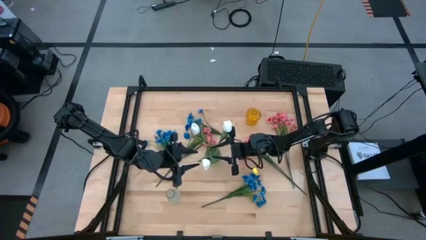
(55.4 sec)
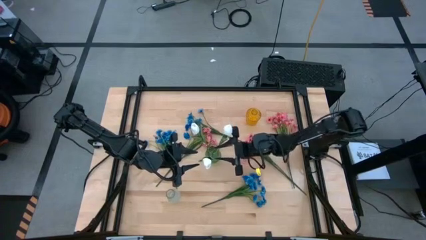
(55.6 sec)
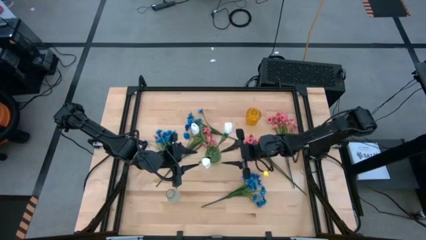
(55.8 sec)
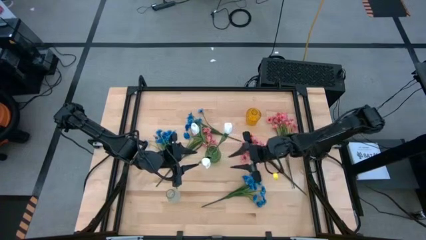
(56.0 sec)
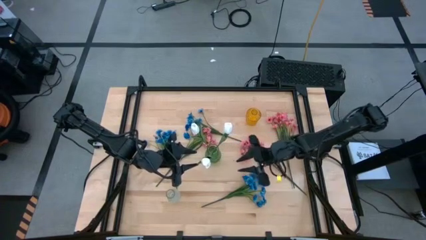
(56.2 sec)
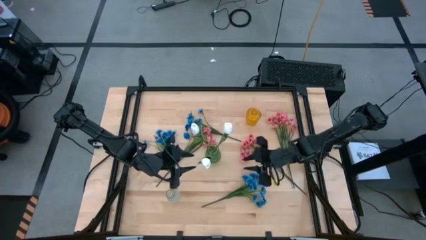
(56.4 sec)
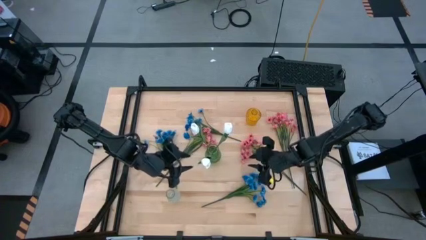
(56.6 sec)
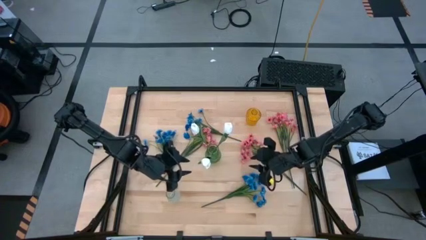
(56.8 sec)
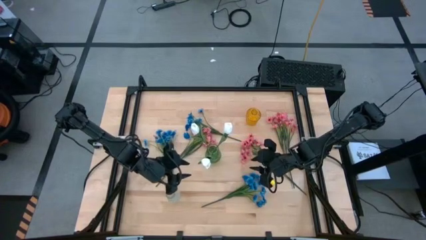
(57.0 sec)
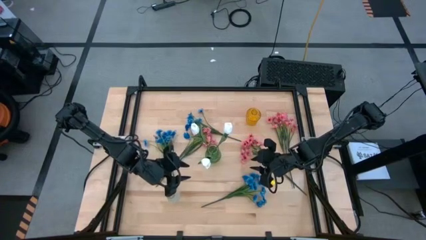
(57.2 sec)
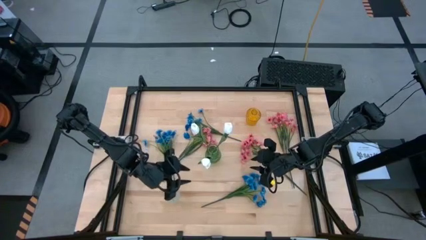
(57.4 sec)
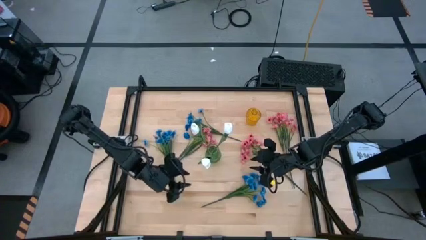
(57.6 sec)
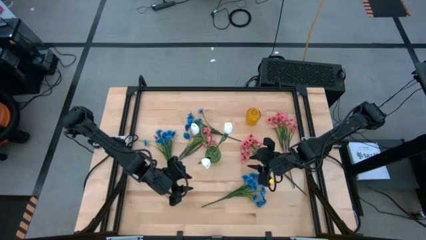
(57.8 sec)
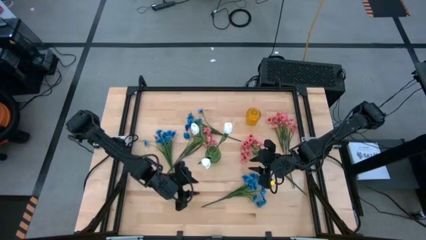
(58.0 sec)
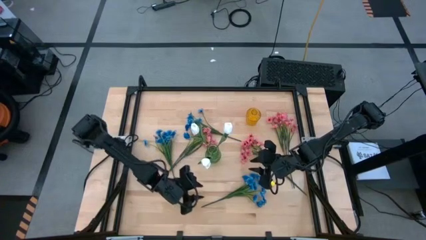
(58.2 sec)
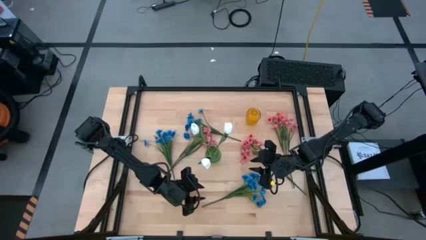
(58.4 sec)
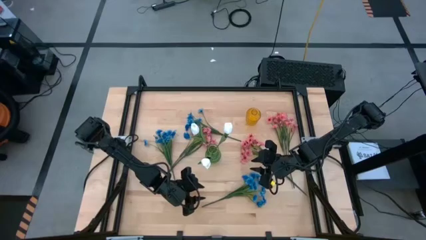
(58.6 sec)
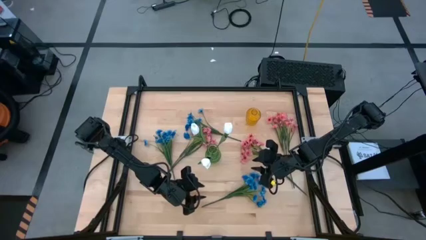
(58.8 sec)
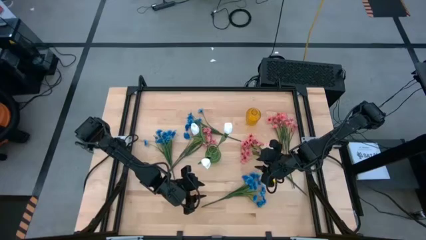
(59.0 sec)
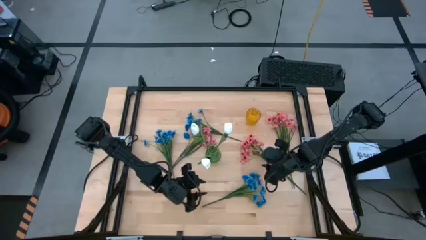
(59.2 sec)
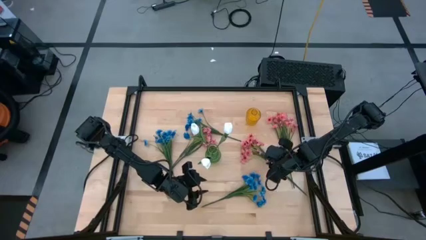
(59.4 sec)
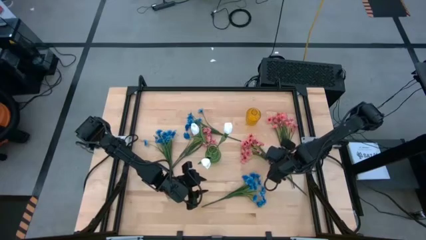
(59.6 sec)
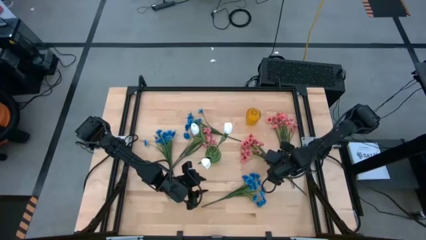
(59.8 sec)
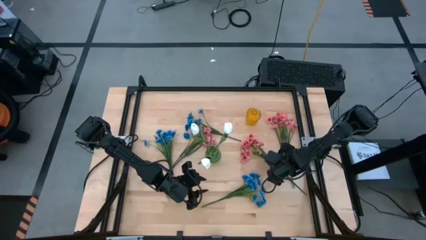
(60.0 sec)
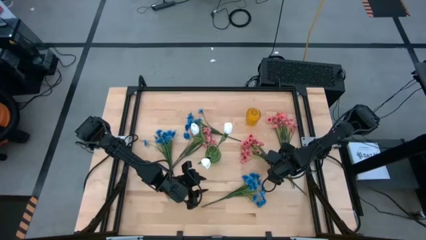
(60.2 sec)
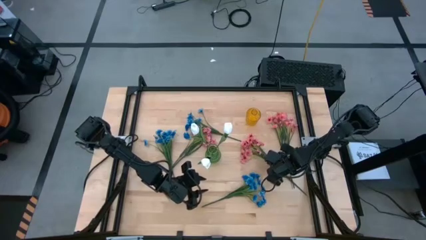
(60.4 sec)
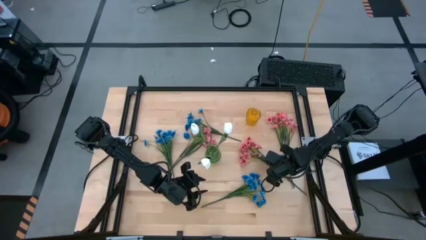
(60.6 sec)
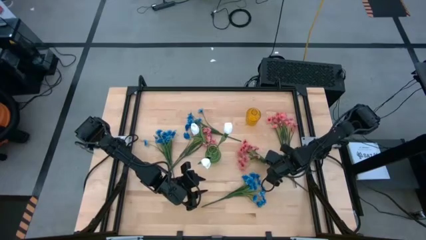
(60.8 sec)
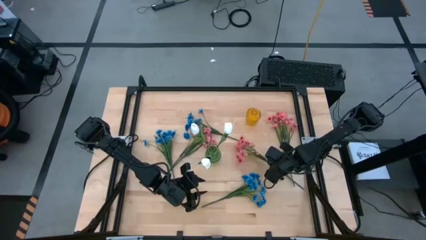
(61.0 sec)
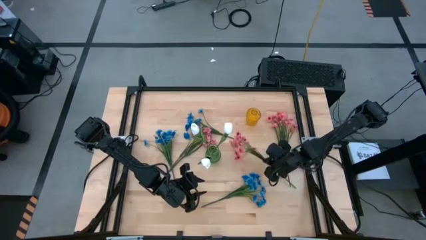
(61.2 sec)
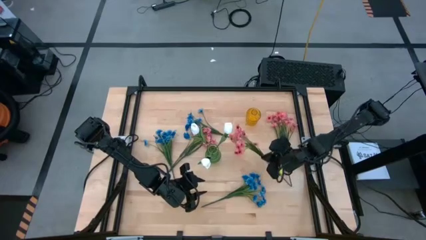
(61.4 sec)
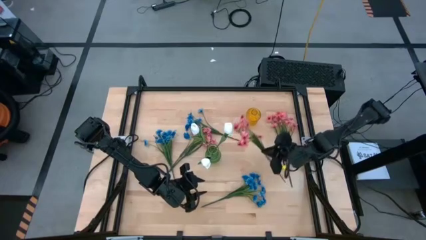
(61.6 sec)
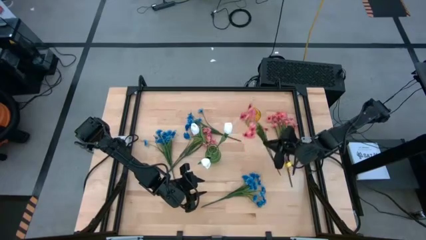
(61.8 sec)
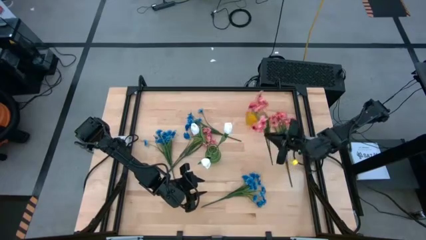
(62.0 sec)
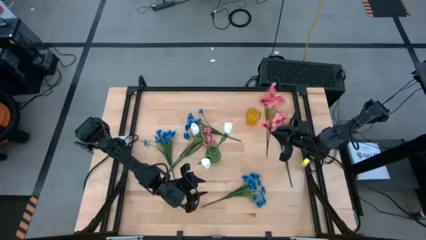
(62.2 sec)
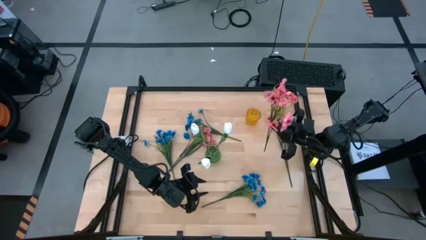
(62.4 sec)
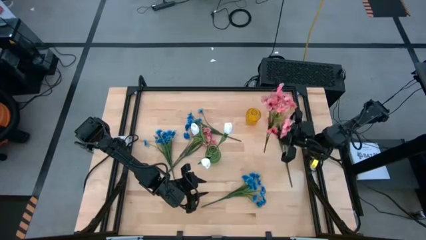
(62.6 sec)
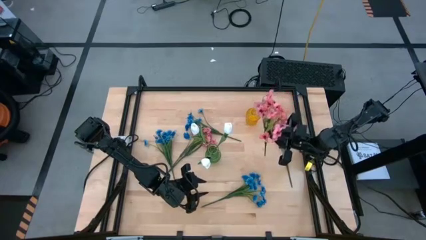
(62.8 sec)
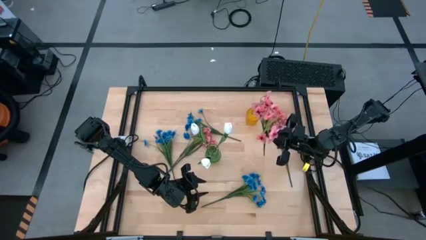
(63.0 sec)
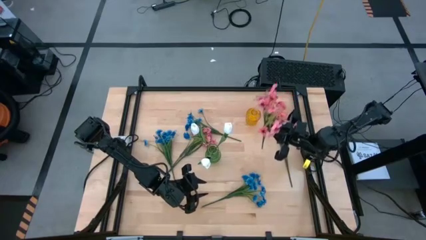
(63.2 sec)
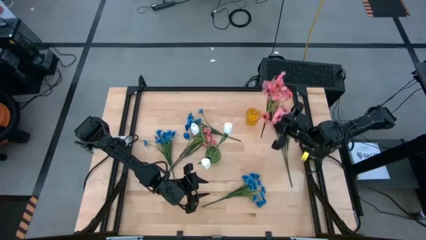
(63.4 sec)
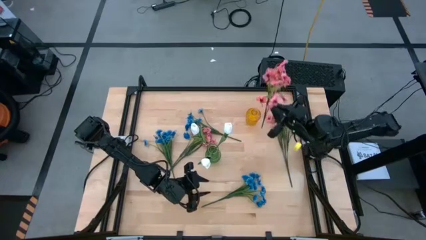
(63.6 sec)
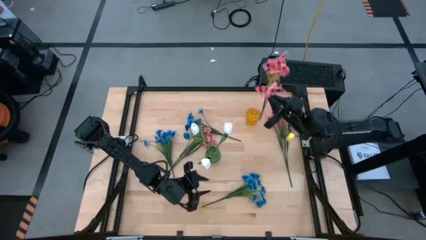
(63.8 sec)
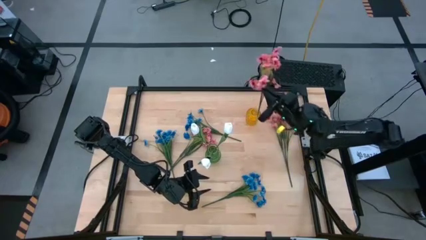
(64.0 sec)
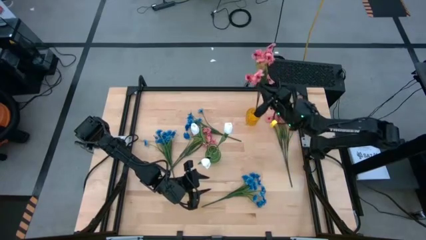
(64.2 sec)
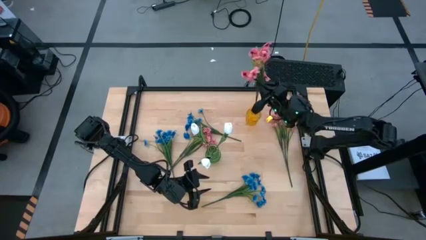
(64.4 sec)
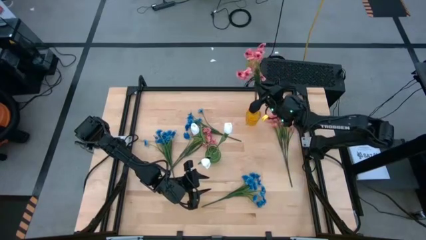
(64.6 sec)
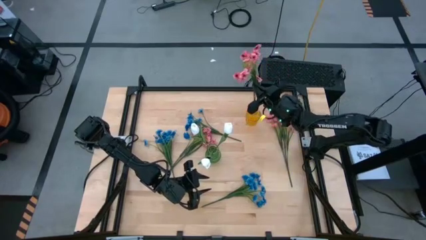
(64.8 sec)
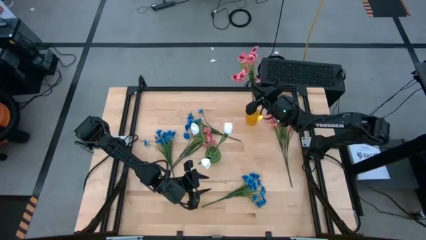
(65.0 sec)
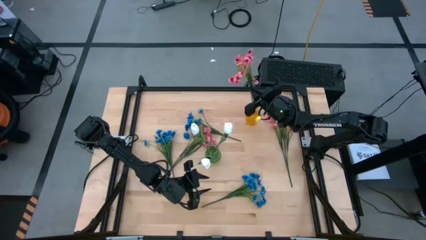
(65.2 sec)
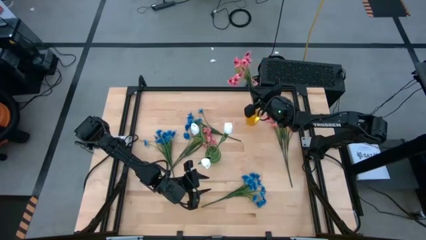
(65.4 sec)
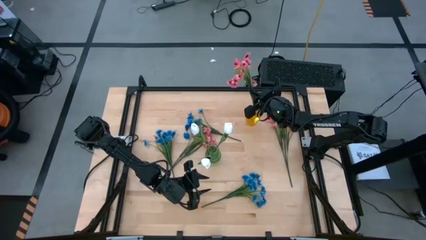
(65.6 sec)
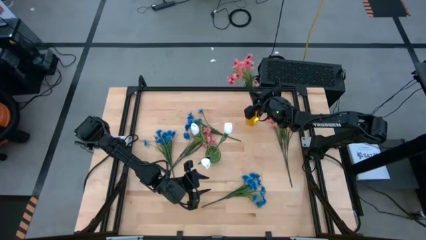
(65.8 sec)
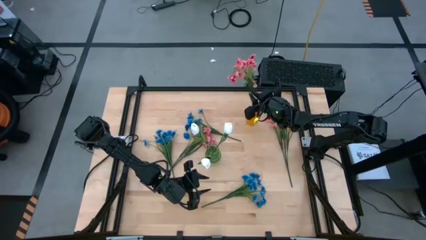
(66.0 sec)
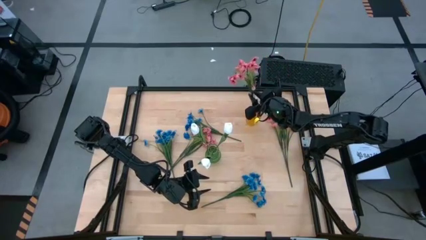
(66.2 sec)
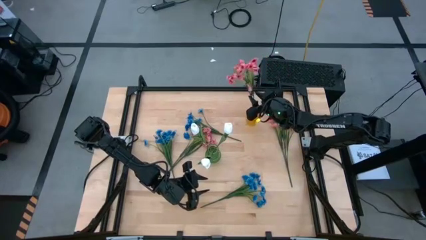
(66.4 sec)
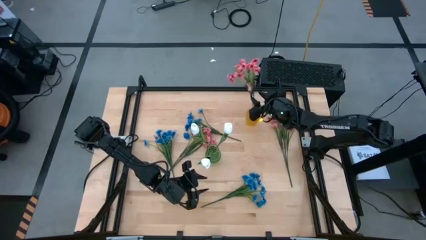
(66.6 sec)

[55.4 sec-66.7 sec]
Task: Sort flowers into vase by color
Put the center pink flowers into the yellow vase
